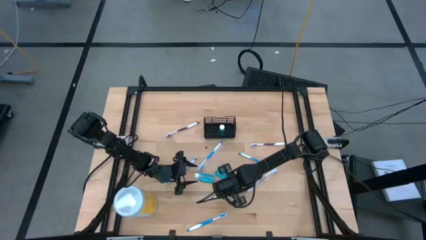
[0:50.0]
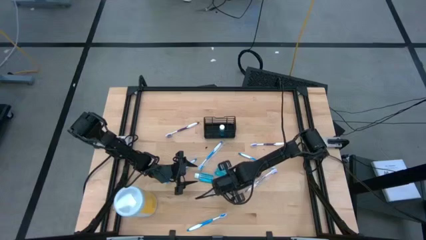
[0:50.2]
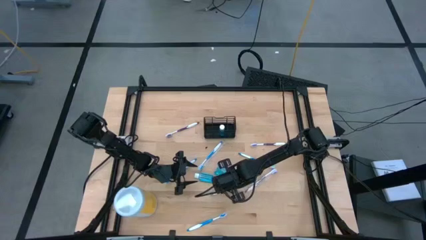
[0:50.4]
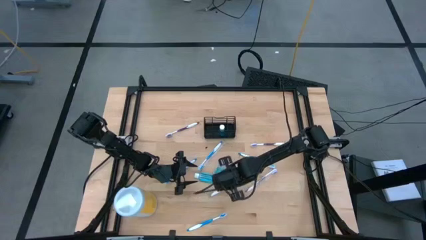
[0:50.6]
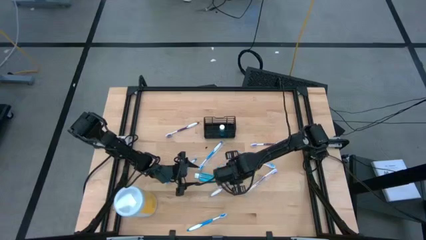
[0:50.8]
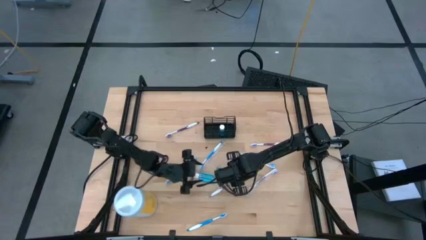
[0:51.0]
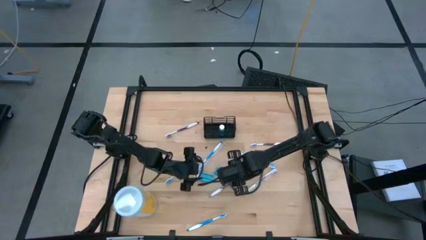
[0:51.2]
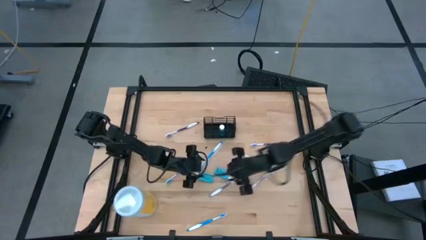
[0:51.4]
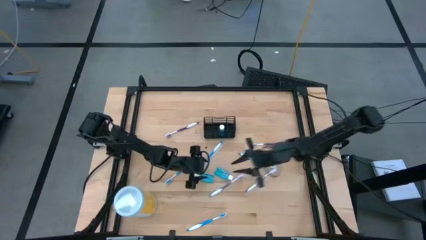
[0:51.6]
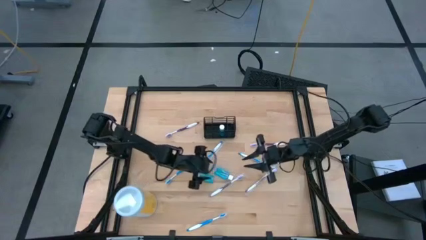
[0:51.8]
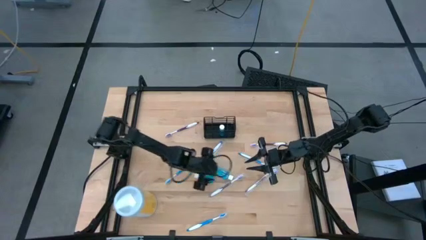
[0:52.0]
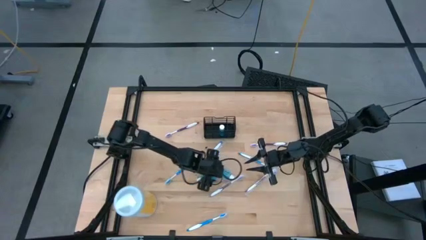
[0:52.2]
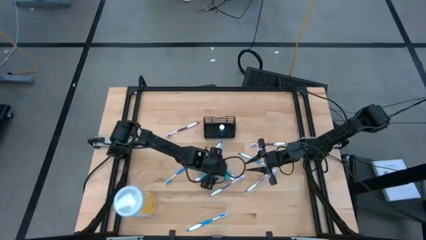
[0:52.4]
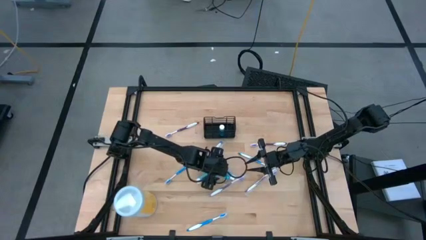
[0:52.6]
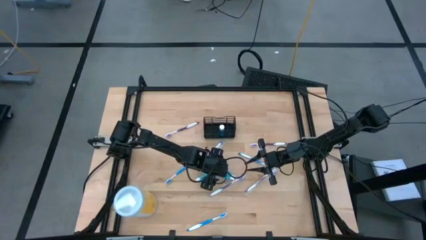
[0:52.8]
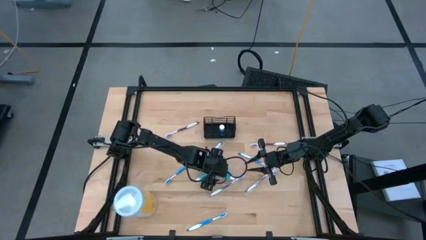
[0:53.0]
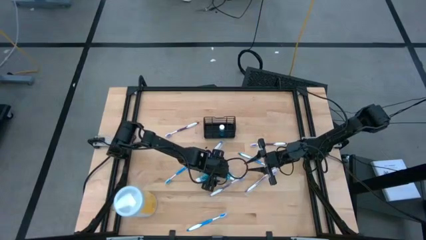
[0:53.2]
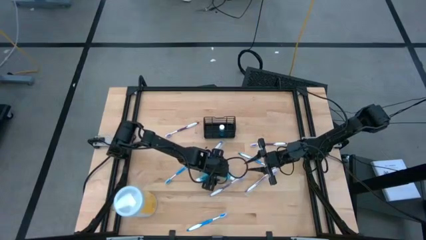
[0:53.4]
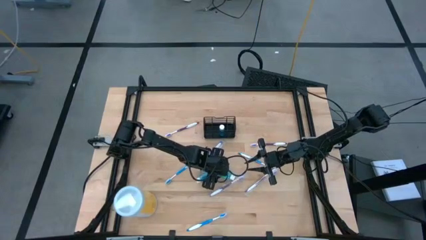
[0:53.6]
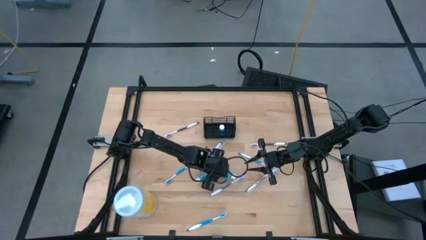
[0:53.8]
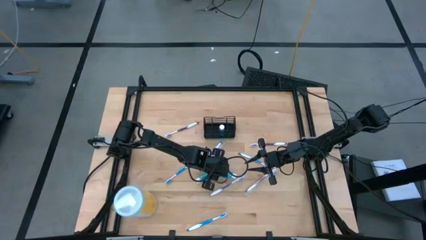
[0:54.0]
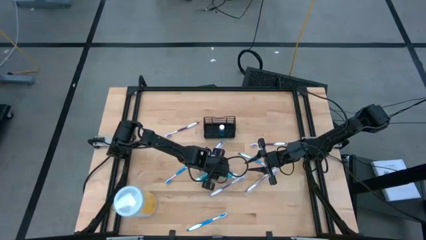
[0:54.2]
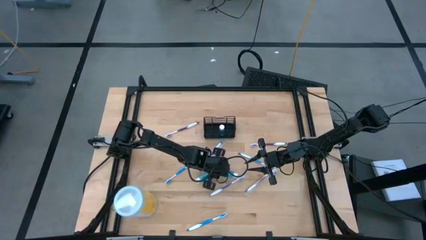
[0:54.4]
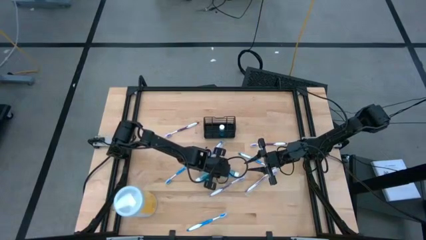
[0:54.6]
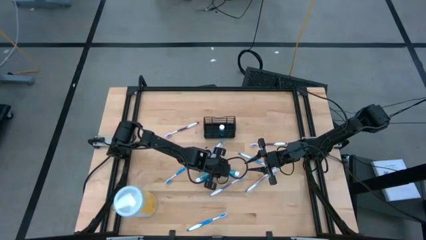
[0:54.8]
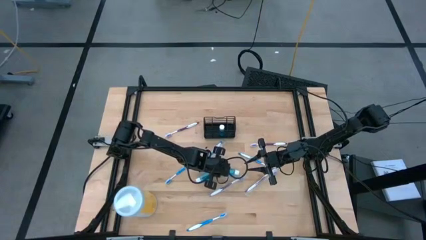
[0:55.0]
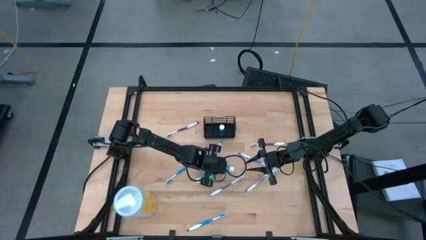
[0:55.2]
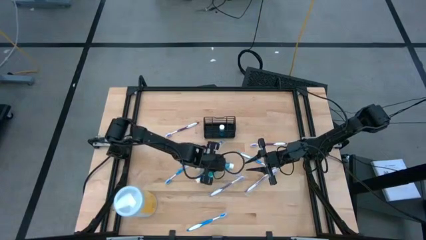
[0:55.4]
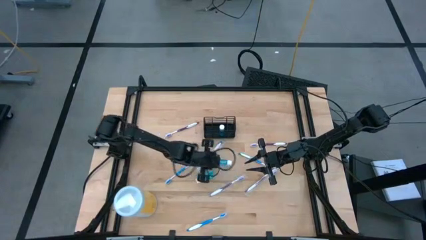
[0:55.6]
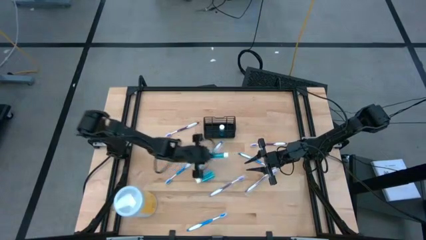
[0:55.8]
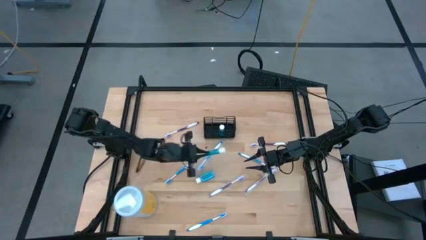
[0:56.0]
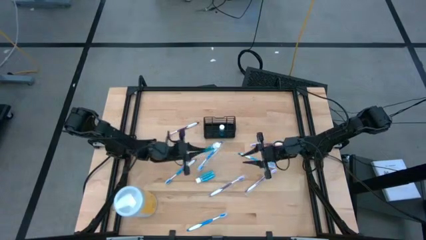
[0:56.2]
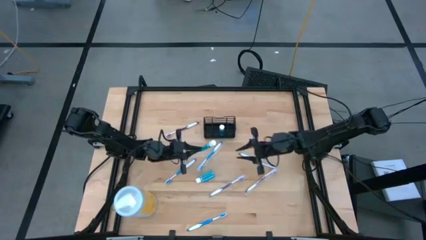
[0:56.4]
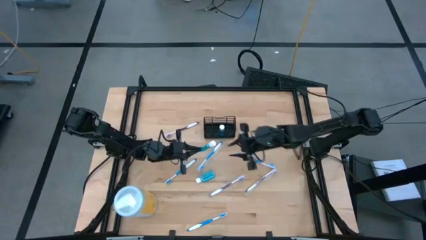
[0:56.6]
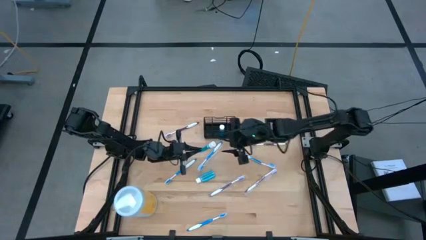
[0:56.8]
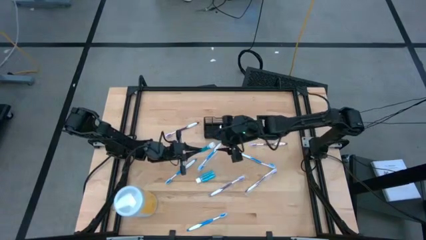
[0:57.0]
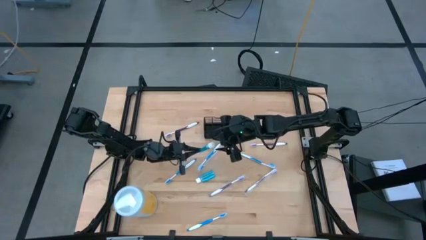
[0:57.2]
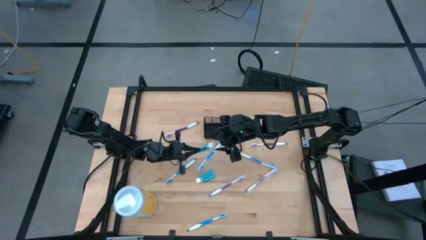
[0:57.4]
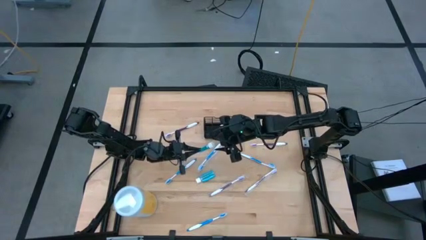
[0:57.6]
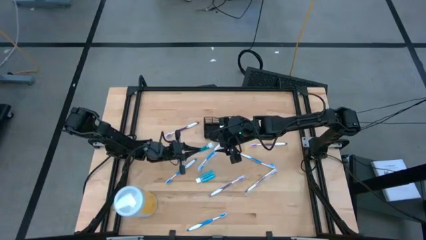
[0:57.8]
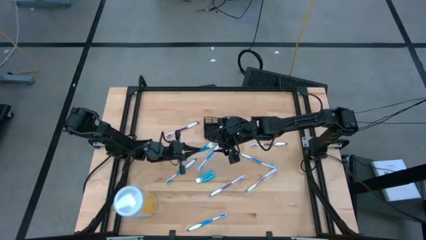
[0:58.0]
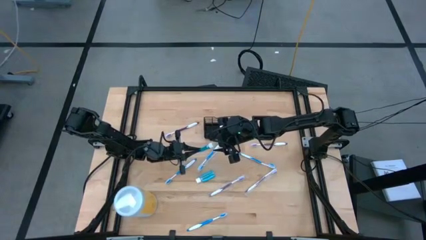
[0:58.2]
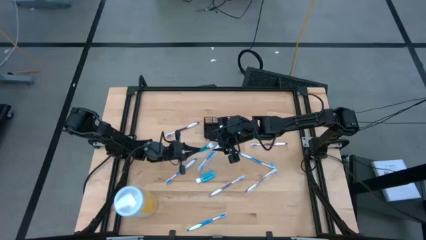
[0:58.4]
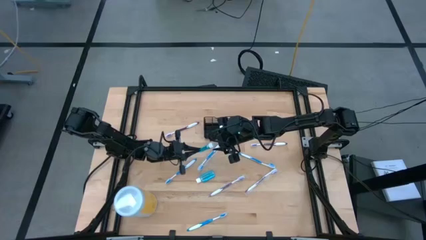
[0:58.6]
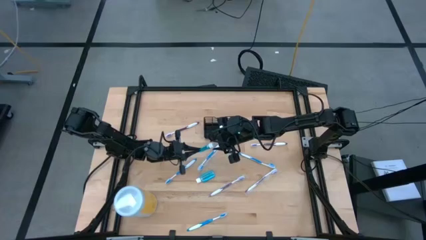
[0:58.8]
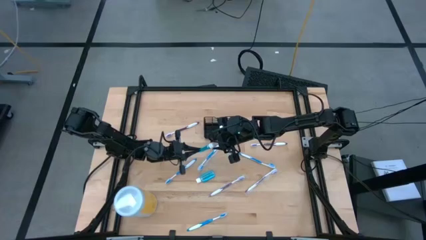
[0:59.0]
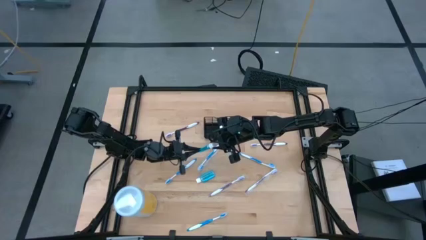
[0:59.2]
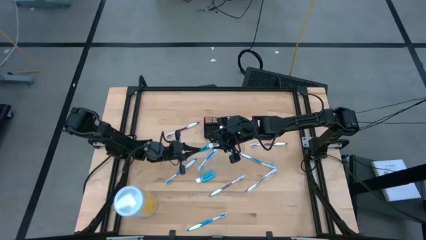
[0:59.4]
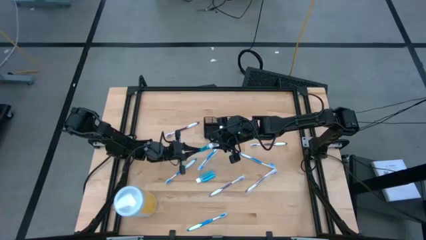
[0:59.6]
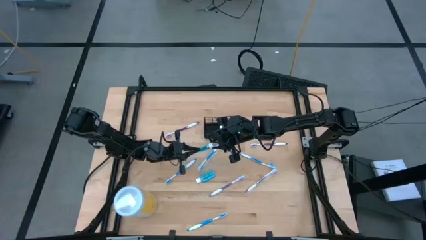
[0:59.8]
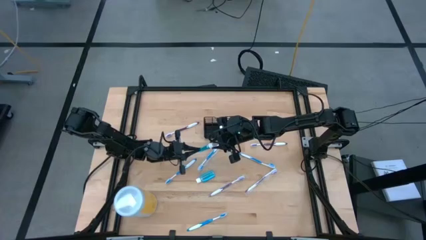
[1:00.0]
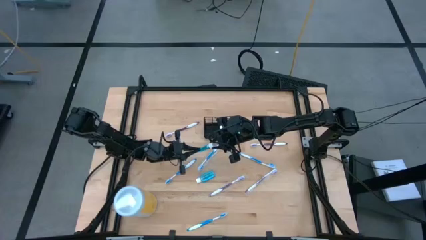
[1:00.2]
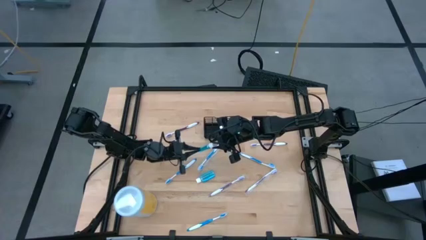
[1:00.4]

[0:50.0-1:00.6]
Task: Pick & Place toothbrushing station
Put the blue mouthwash bottle into the black organizer
